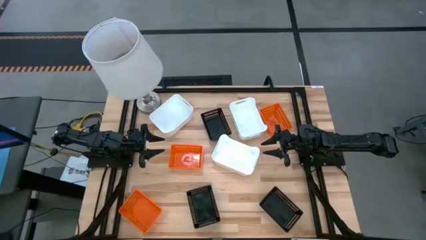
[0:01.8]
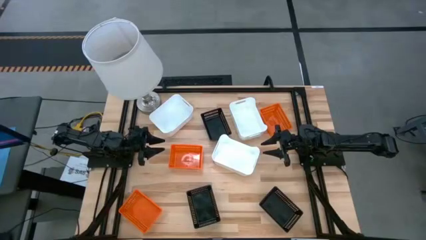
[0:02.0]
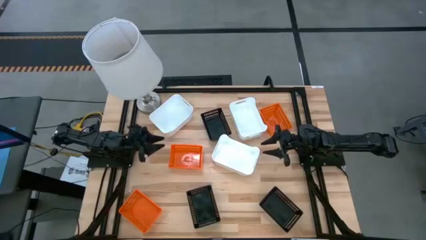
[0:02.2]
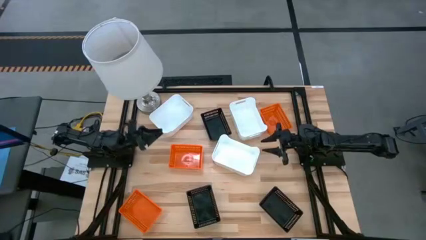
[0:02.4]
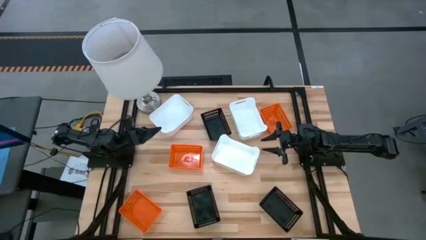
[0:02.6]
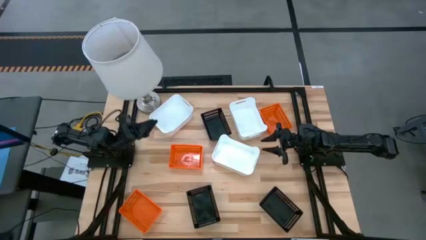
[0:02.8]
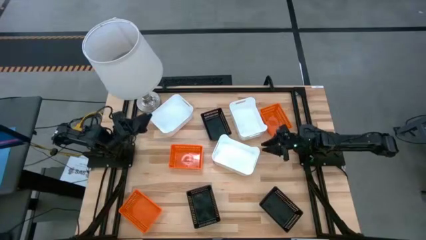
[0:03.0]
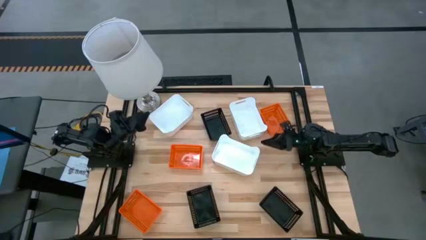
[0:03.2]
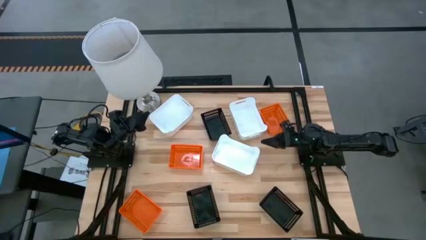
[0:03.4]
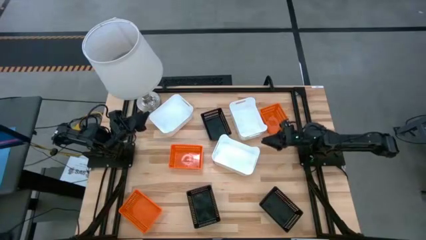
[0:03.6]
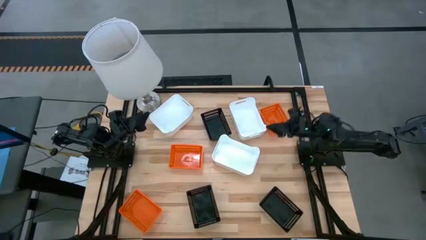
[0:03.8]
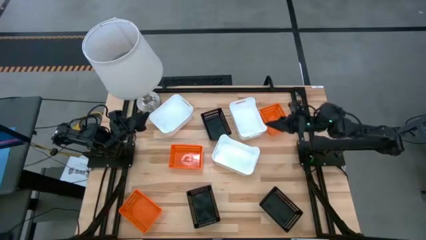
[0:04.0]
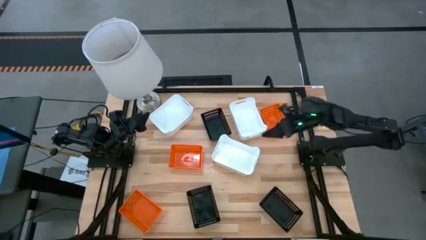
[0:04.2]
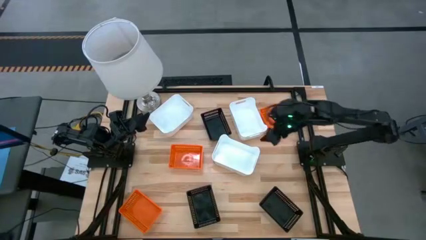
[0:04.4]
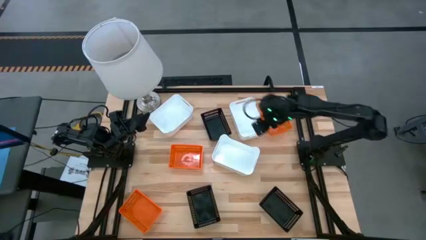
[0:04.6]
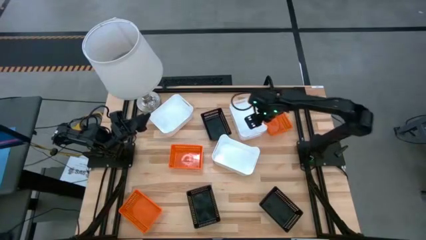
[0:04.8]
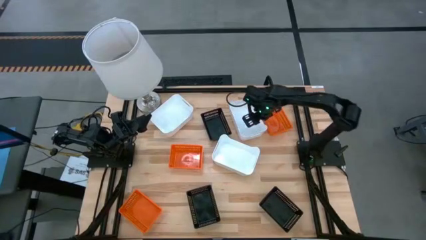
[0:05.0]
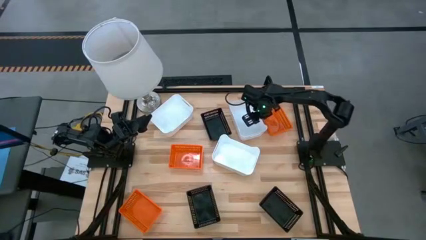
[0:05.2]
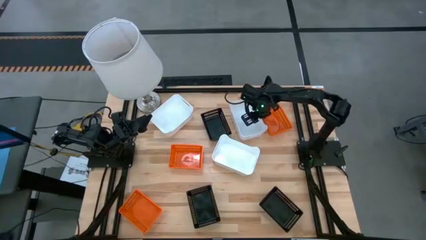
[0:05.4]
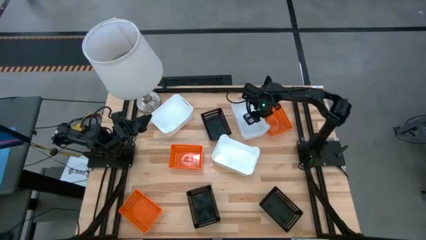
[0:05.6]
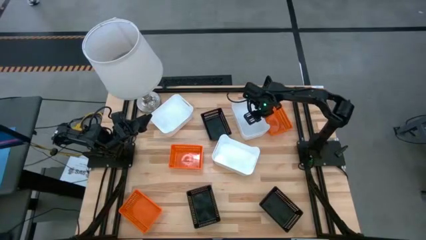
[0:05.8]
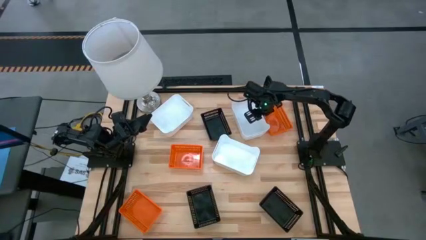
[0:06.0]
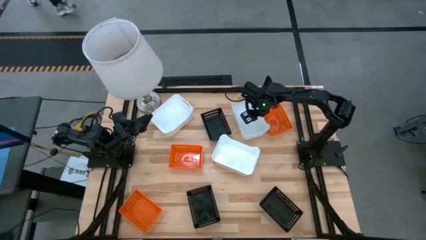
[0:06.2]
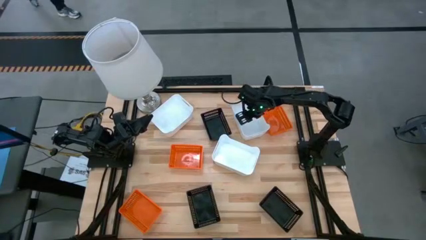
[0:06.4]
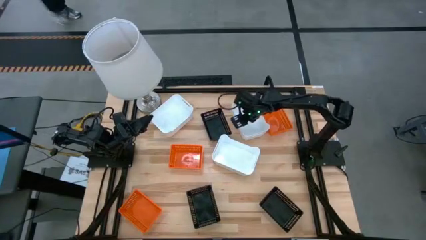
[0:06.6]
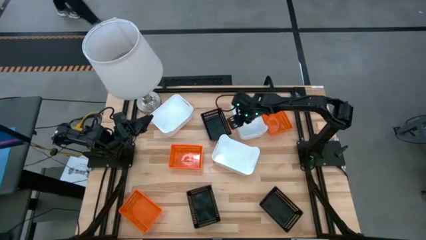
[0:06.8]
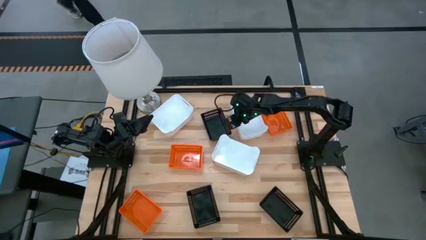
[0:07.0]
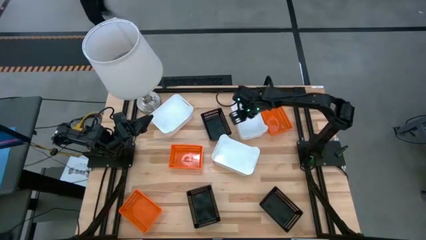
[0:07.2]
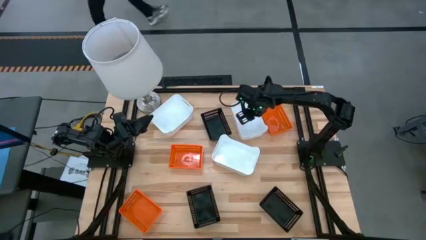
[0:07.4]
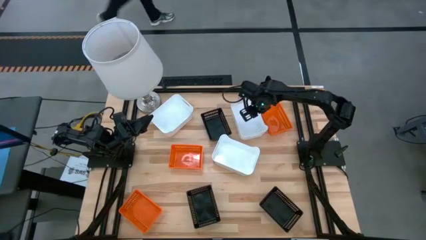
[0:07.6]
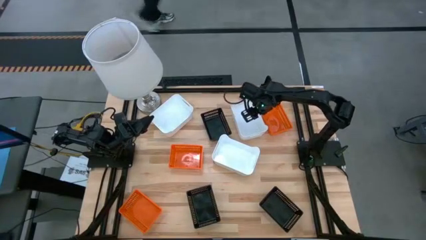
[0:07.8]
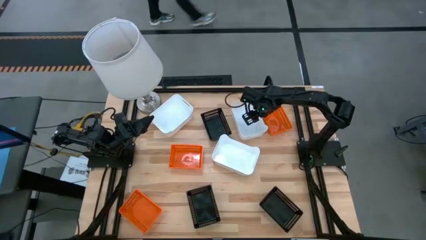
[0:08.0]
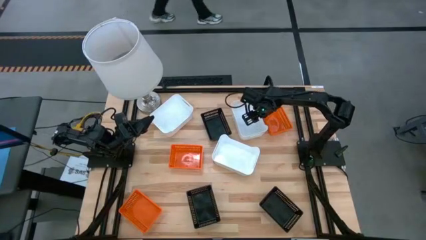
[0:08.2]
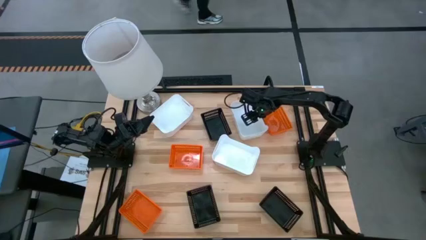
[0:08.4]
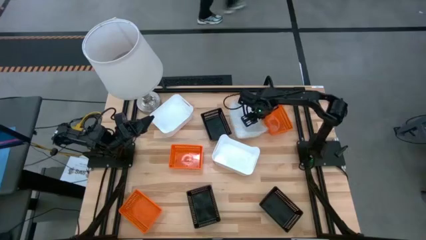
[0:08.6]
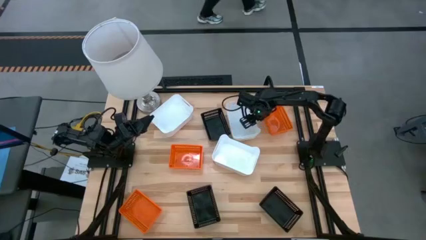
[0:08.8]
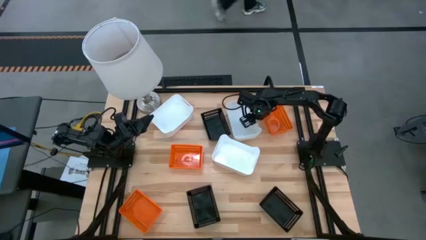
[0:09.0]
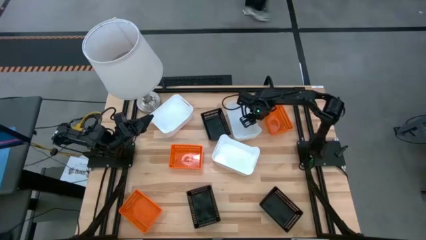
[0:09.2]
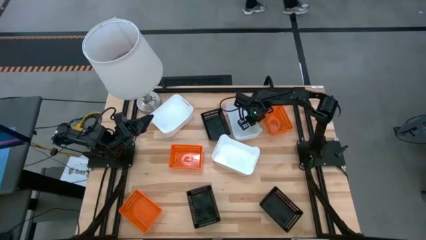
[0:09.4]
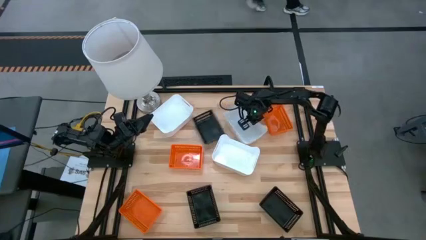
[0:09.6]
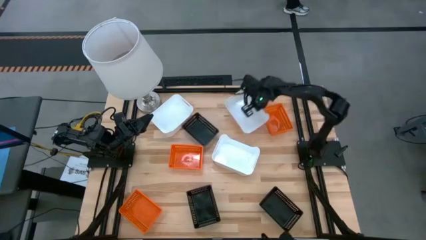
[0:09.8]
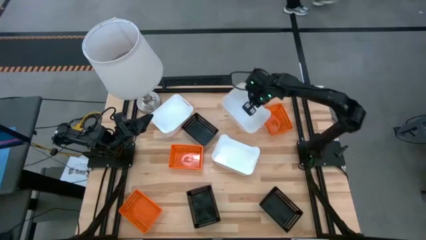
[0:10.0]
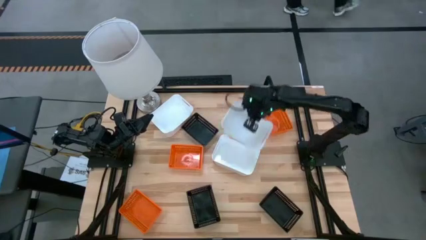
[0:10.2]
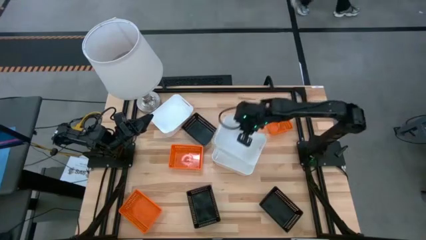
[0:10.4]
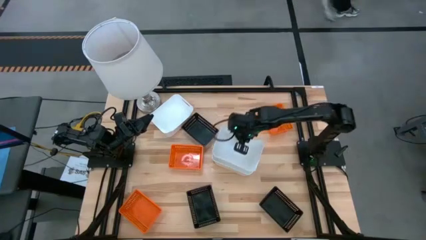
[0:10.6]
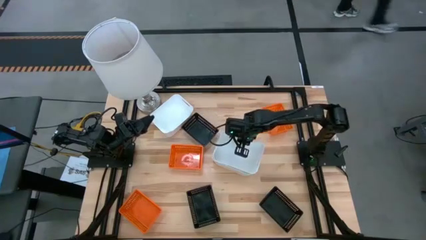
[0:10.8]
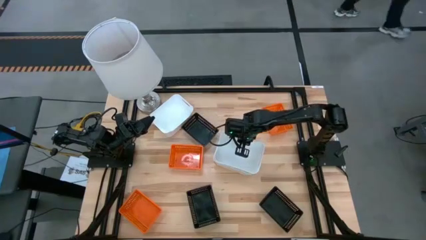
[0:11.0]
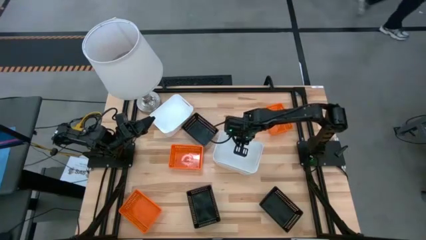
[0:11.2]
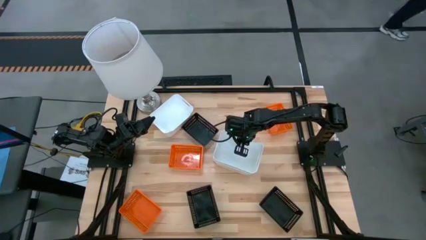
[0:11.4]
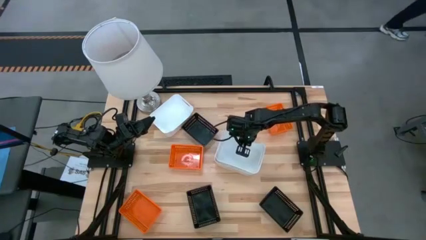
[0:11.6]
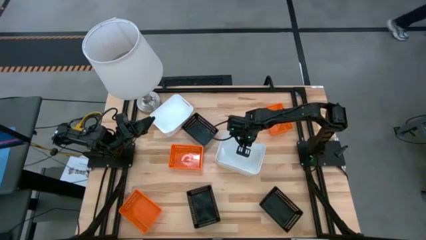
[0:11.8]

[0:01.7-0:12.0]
Stack the top right white bin on top of the bottom right white bin
